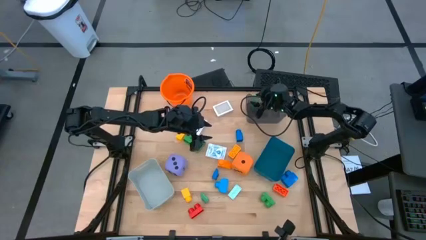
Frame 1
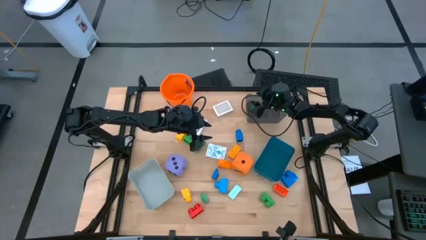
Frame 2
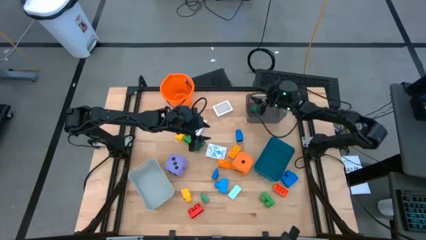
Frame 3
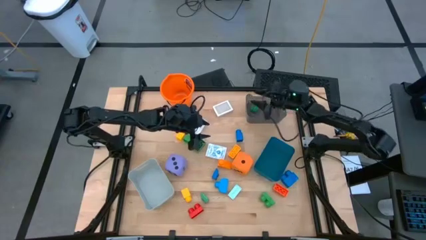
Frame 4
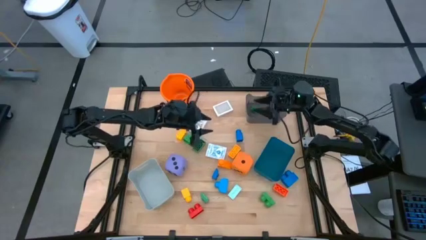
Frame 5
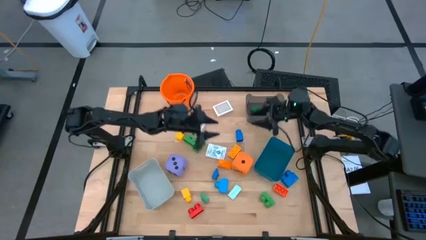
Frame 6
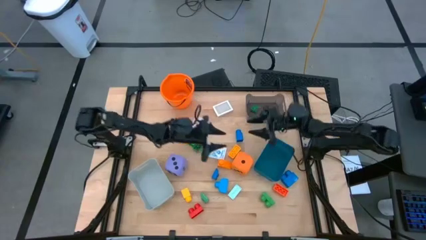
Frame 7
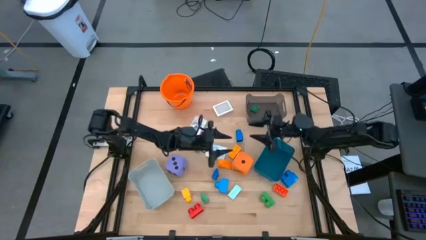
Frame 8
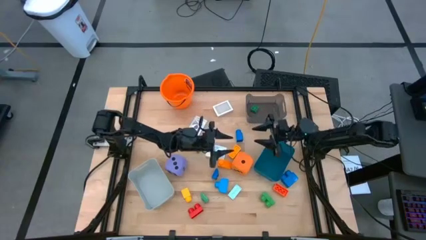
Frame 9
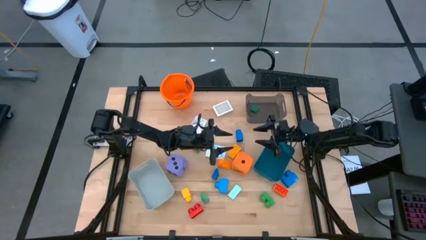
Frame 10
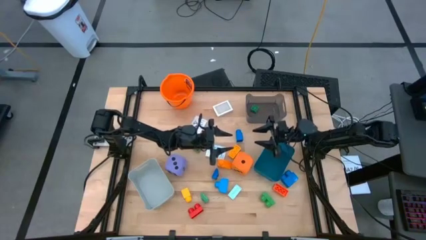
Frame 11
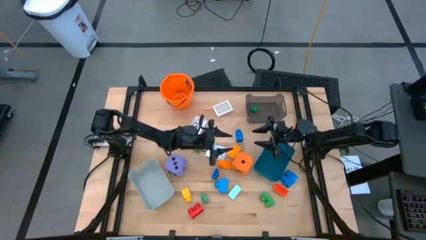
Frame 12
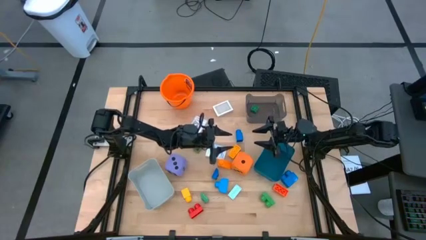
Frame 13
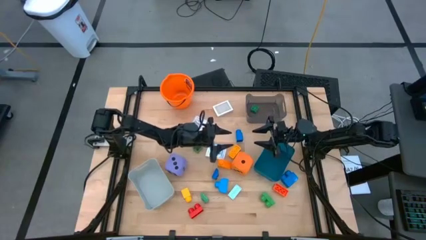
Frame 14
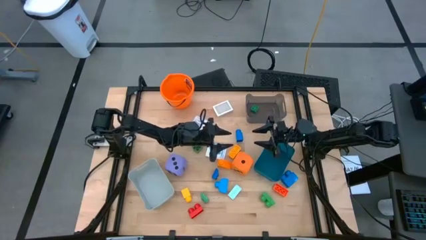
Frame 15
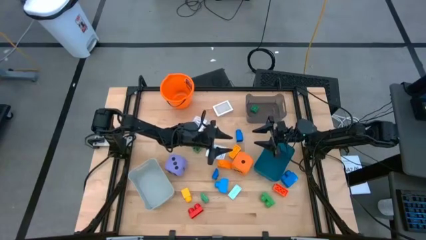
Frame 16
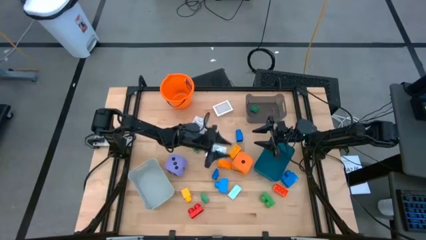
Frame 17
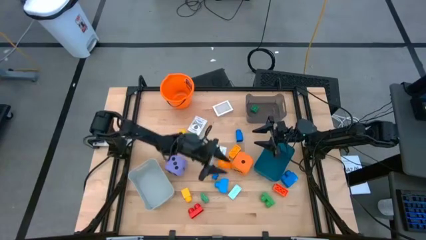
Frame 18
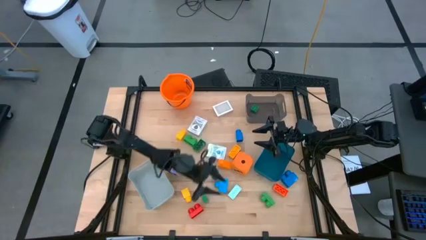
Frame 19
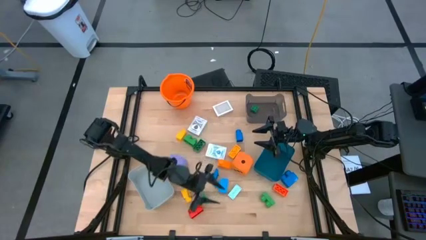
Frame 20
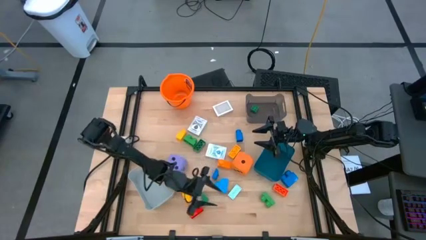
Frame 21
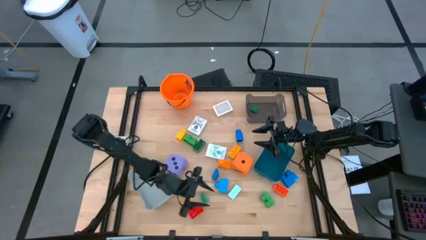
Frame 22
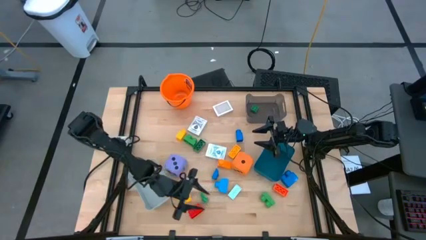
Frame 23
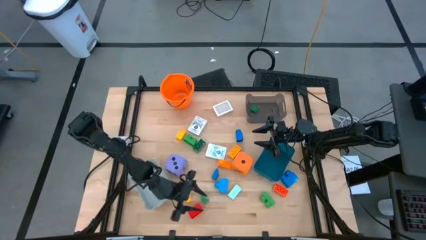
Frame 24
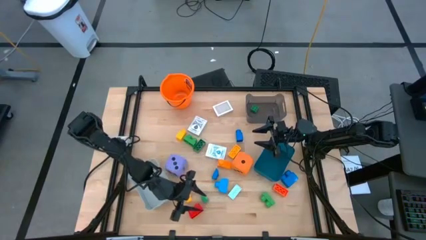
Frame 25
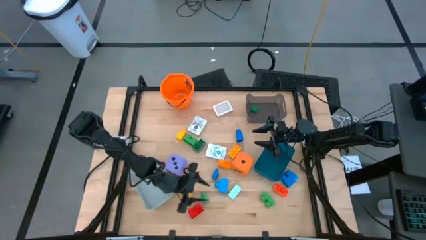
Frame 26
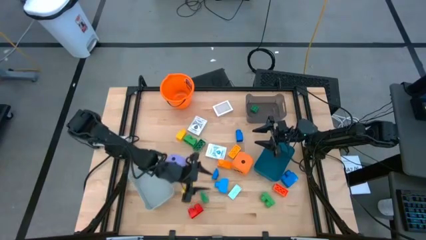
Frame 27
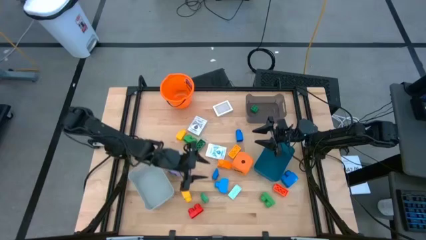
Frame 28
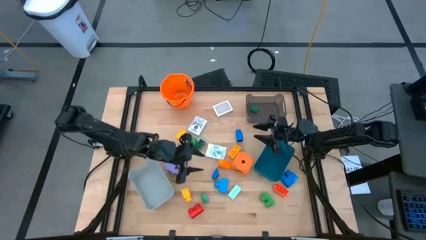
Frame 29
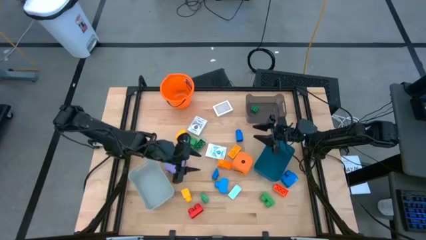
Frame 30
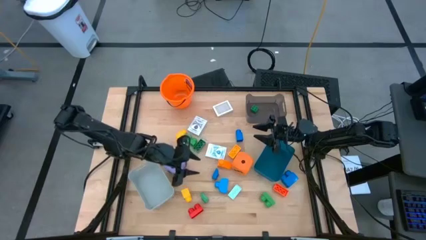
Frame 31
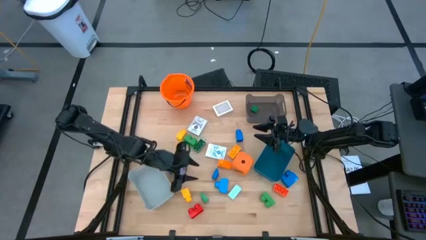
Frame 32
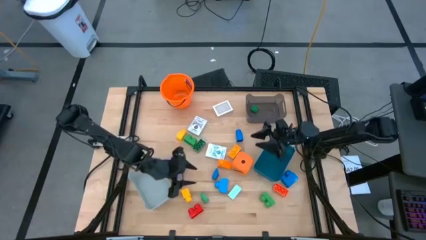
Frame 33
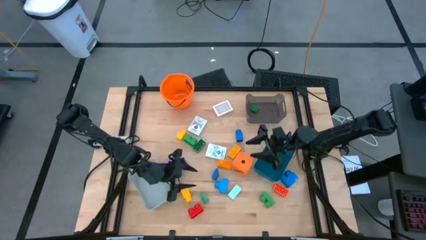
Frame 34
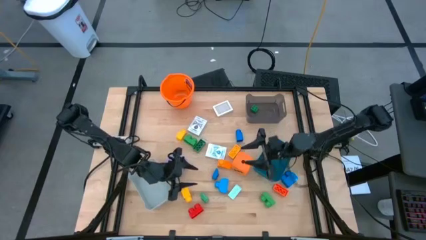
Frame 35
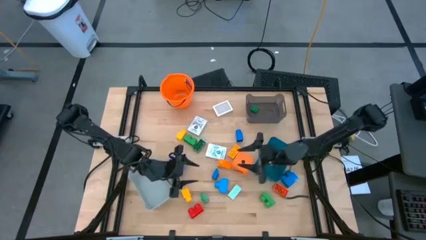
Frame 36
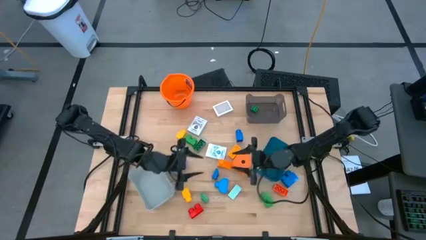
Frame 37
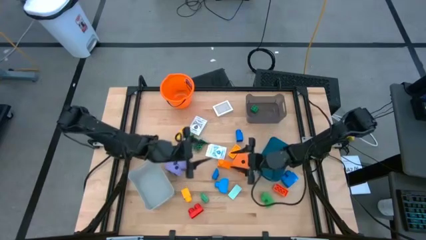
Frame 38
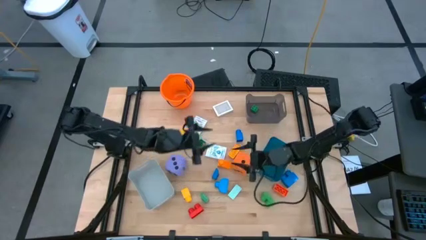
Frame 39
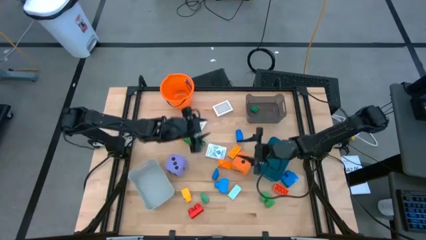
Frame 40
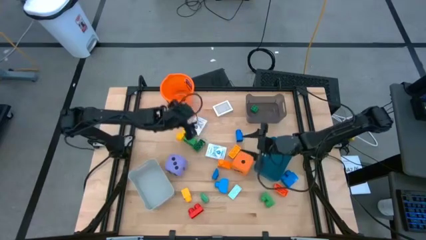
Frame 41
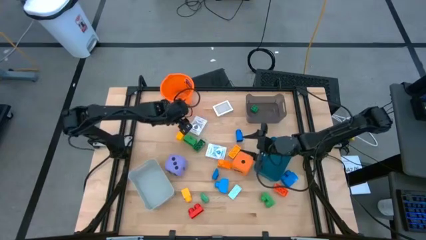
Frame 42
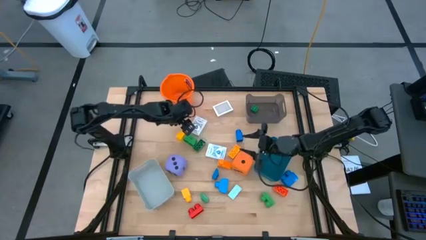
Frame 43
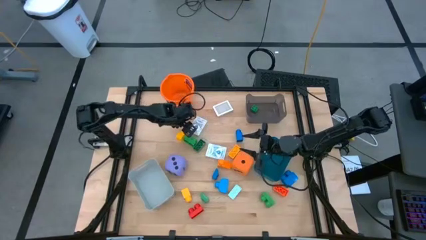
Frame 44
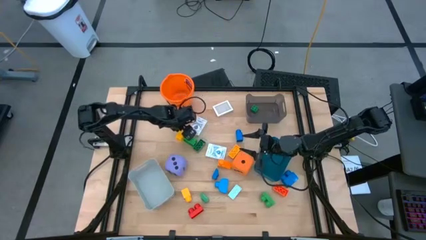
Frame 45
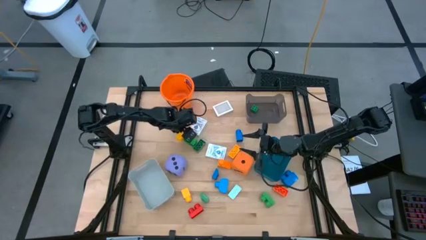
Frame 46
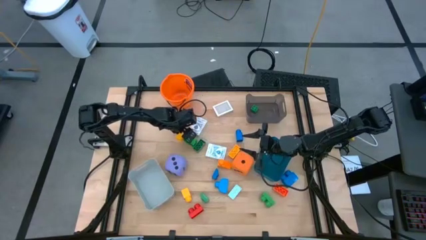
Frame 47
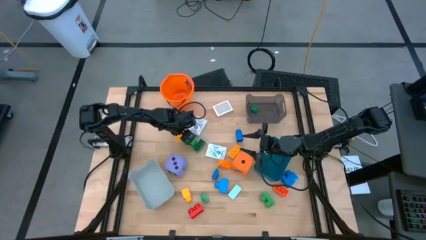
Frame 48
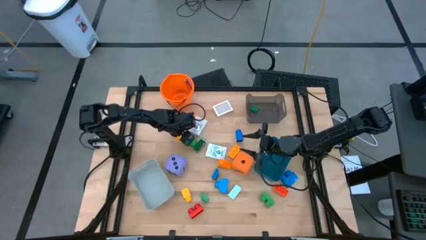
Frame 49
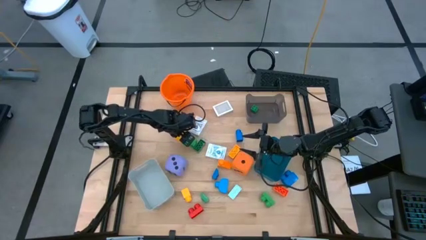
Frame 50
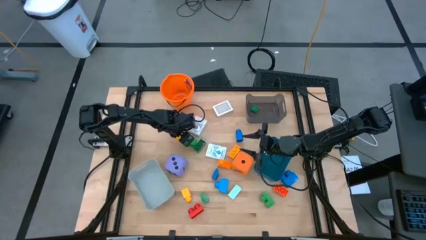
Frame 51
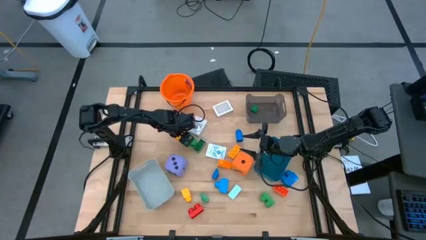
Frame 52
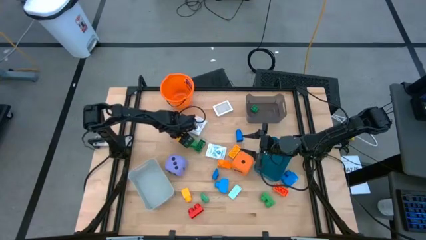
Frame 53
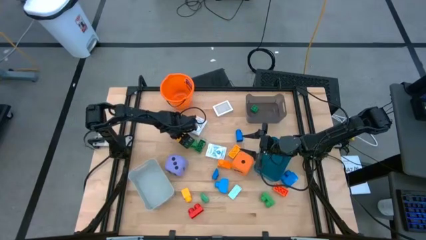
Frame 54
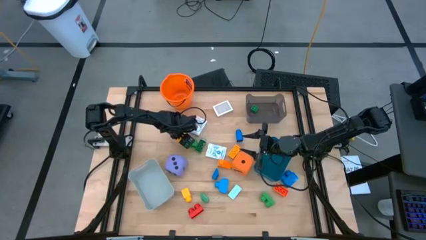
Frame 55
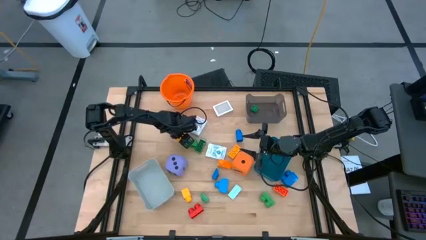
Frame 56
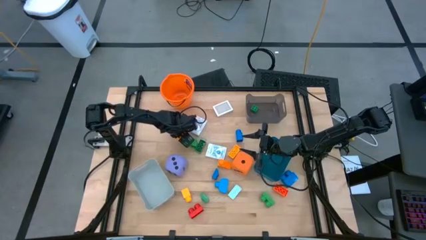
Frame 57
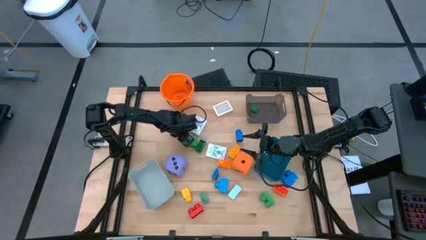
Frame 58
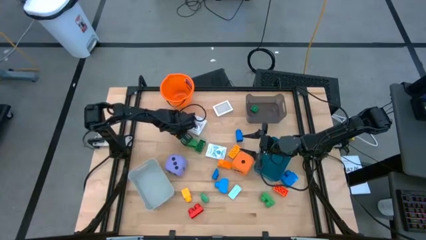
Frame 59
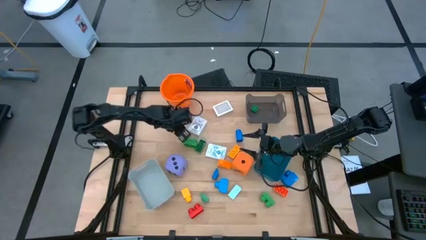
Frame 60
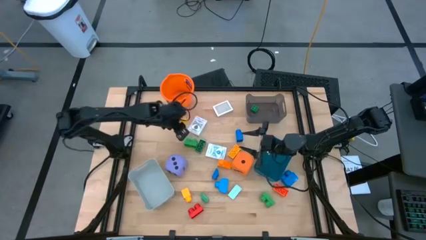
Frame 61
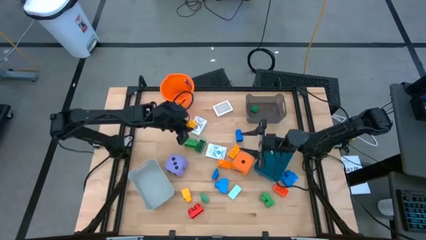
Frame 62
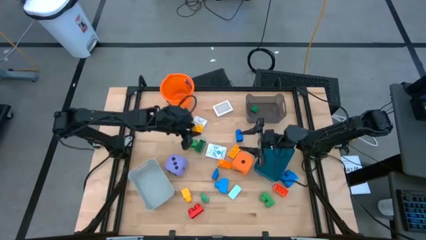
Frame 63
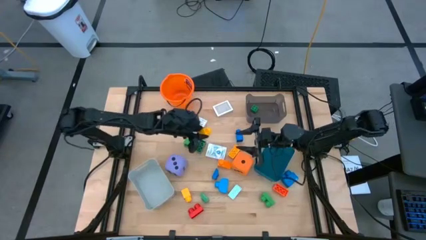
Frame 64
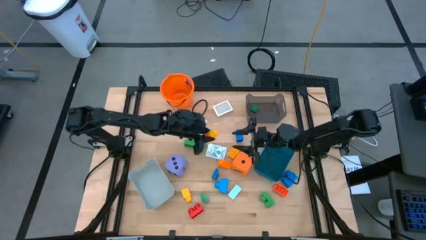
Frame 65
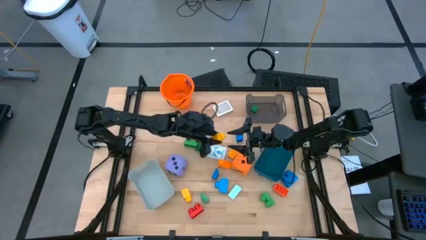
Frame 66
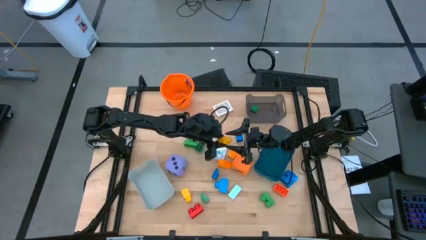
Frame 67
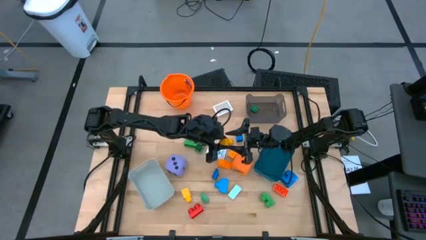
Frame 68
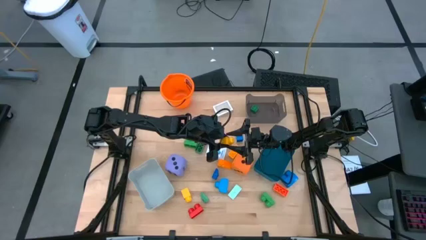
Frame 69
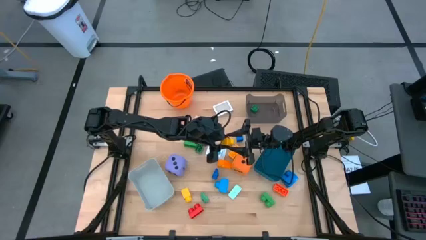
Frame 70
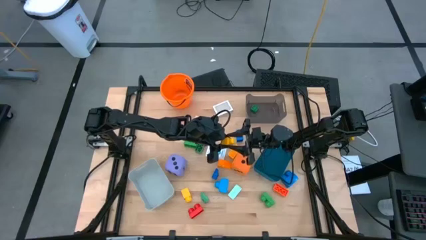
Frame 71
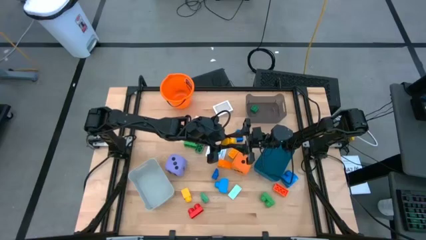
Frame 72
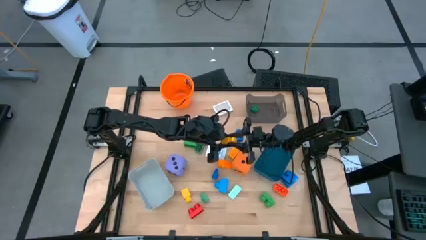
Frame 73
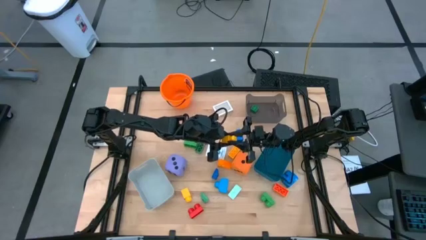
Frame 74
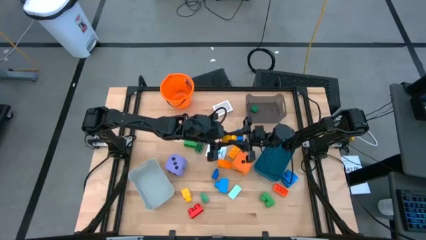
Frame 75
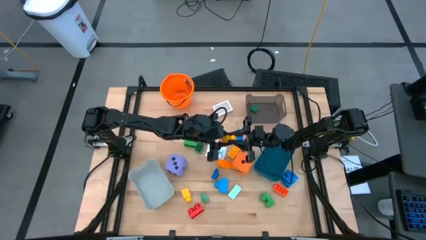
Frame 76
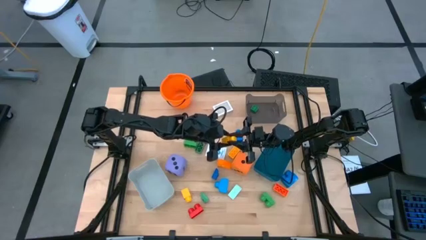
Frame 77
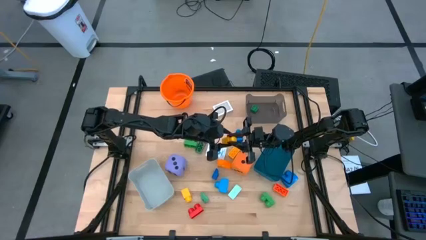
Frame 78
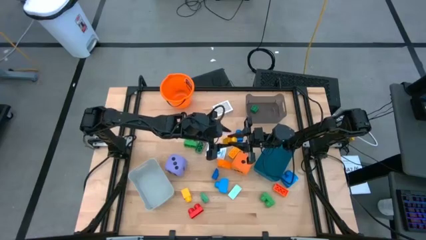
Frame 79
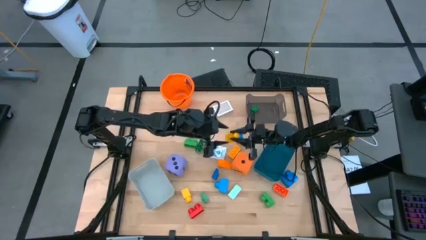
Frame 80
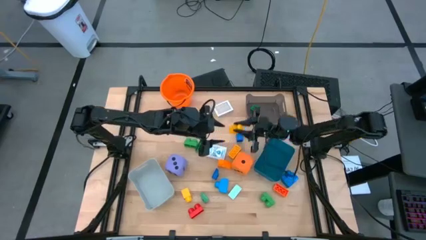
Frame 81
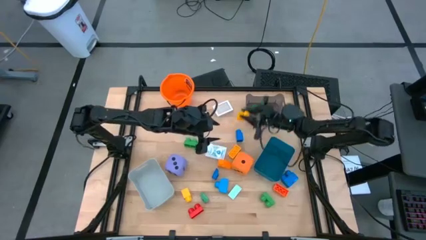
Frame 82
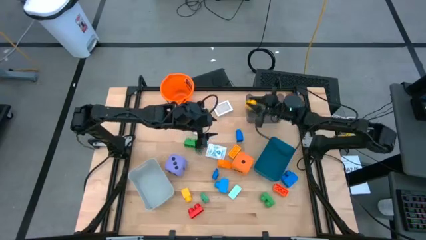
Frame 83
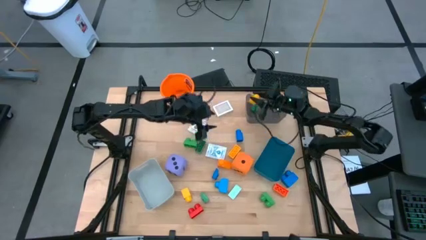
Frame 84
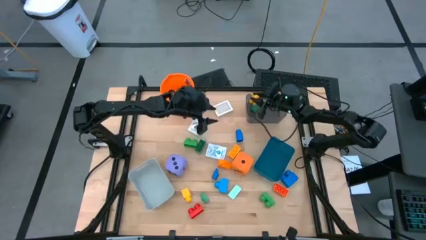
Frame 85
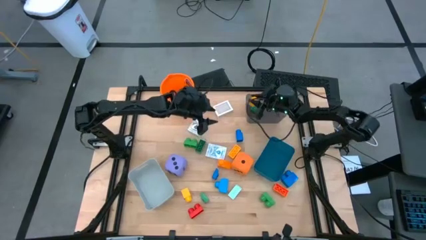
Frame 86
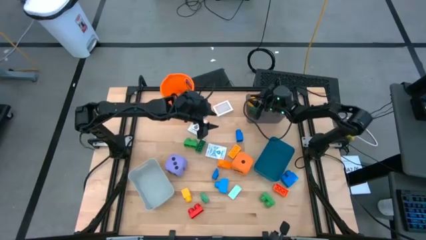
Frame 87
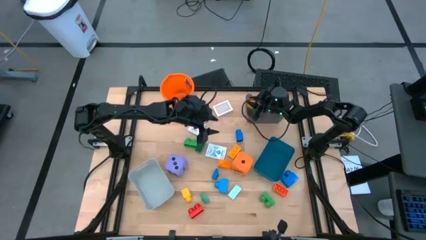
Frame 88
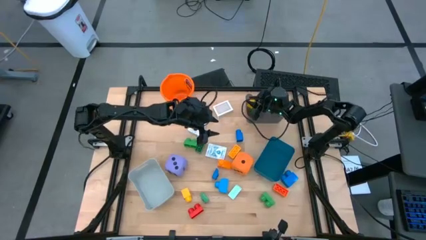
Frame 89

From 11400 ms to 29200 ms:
Task: Pick & Place Toys
Put the yellow game piece into the black bin
